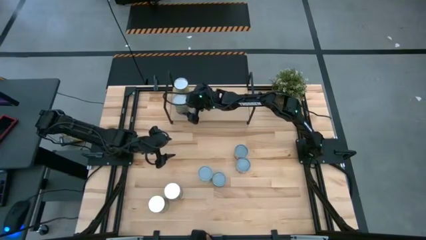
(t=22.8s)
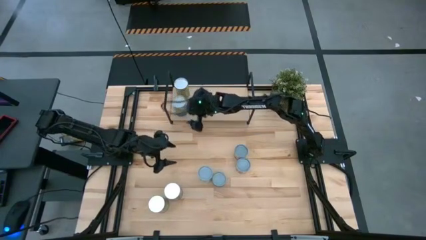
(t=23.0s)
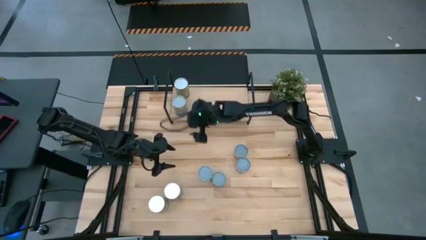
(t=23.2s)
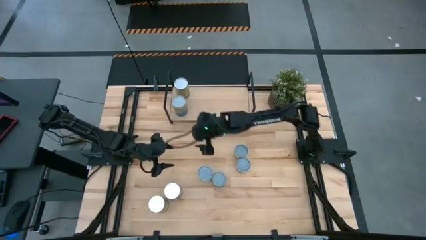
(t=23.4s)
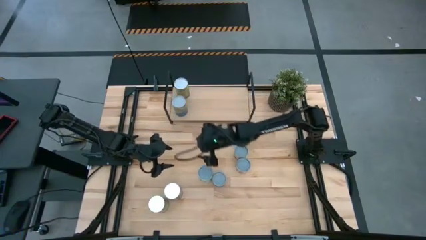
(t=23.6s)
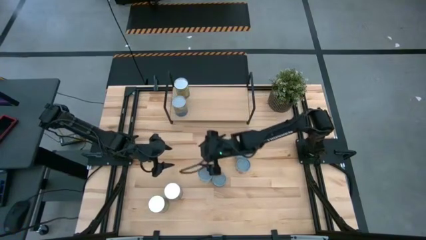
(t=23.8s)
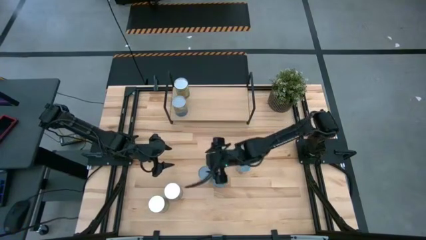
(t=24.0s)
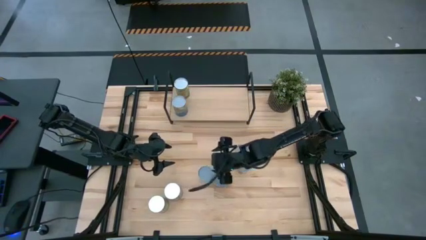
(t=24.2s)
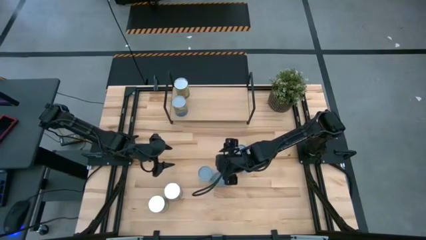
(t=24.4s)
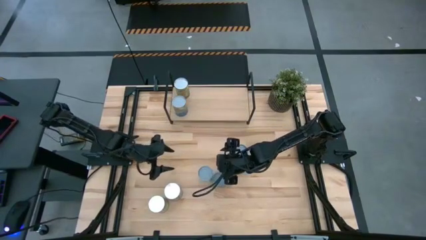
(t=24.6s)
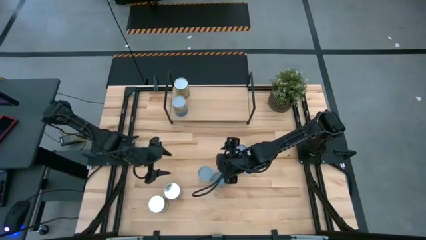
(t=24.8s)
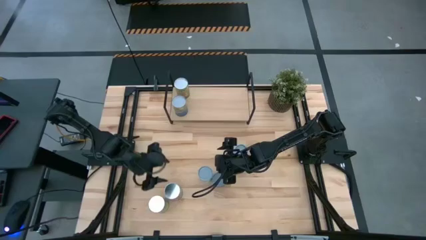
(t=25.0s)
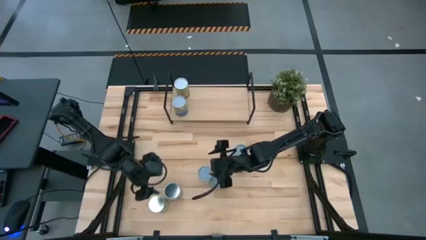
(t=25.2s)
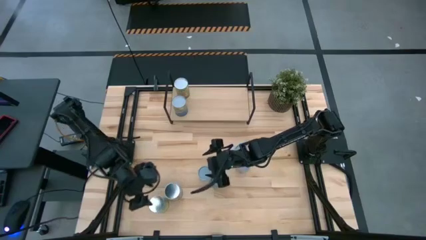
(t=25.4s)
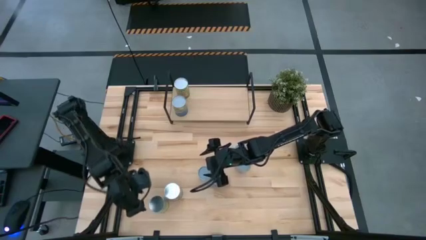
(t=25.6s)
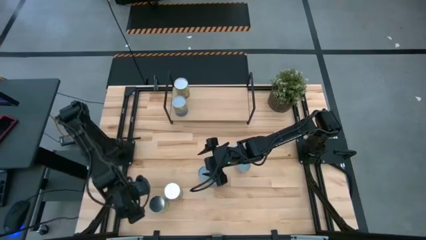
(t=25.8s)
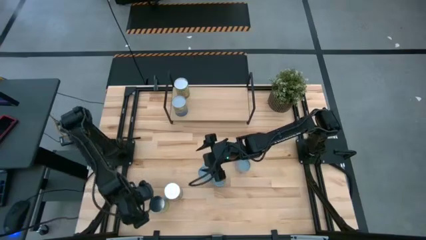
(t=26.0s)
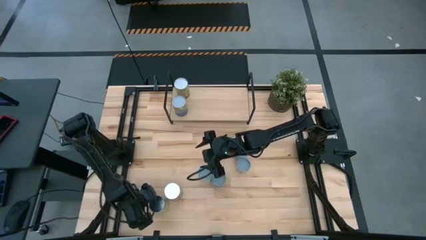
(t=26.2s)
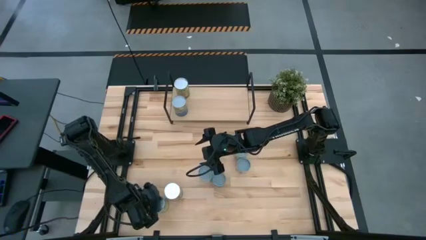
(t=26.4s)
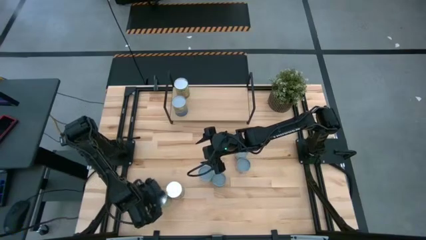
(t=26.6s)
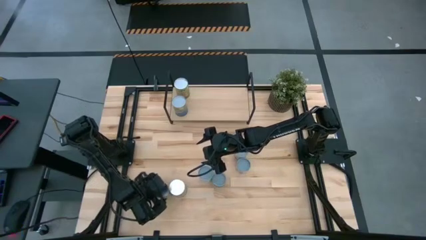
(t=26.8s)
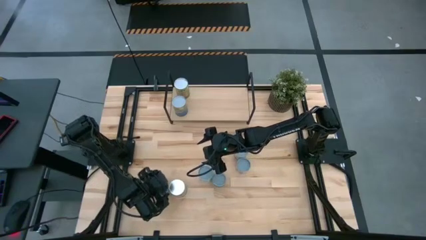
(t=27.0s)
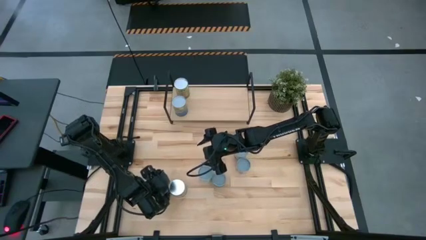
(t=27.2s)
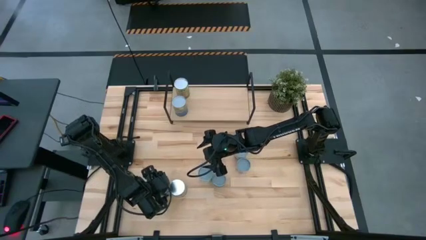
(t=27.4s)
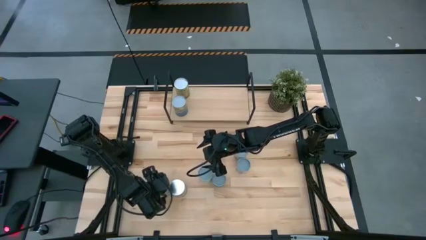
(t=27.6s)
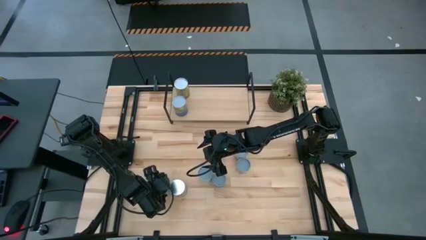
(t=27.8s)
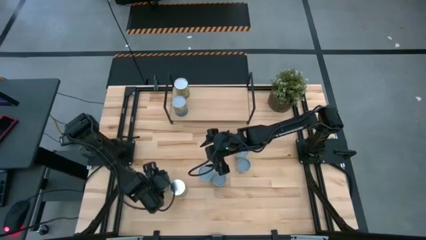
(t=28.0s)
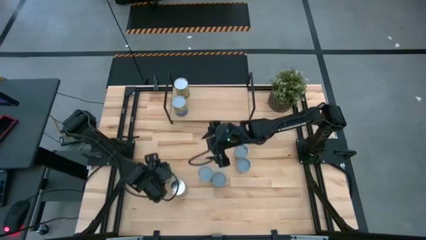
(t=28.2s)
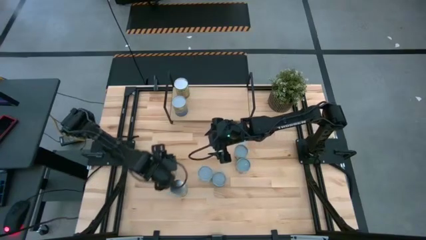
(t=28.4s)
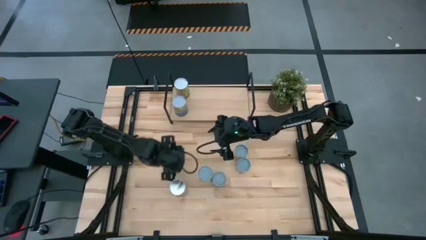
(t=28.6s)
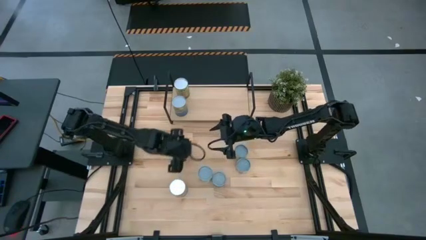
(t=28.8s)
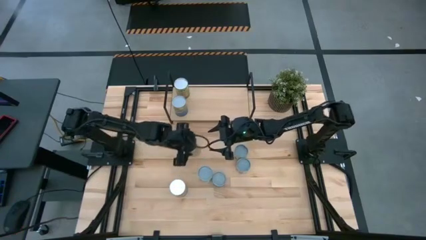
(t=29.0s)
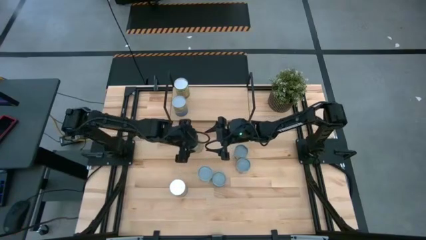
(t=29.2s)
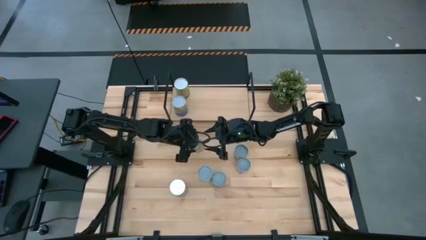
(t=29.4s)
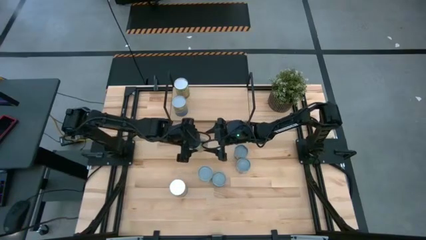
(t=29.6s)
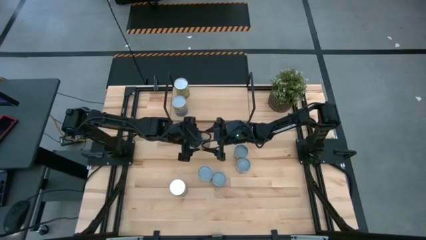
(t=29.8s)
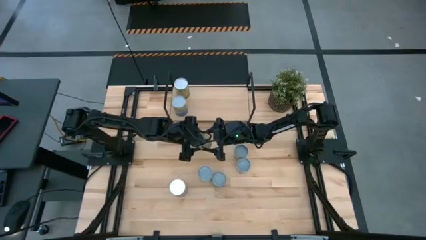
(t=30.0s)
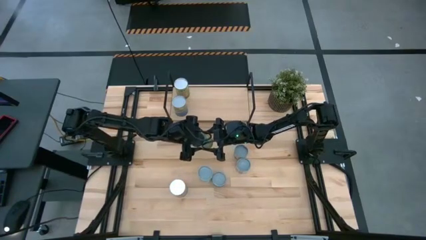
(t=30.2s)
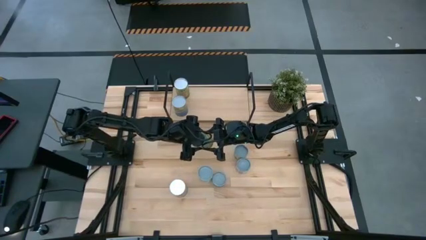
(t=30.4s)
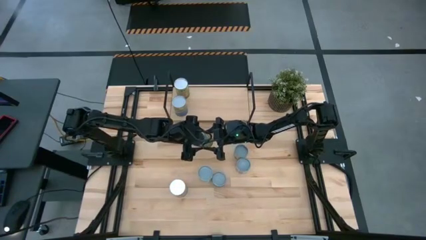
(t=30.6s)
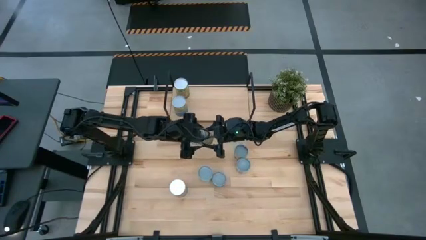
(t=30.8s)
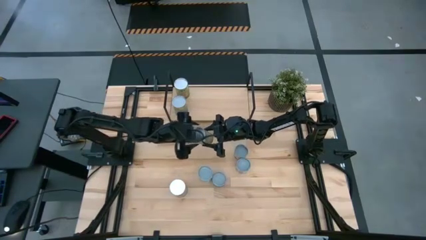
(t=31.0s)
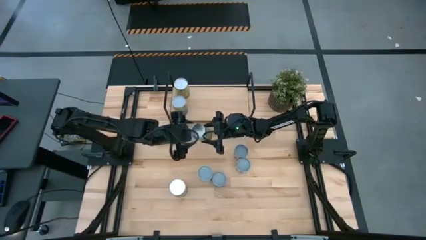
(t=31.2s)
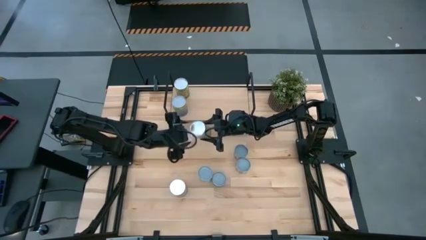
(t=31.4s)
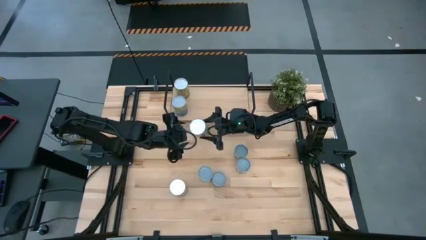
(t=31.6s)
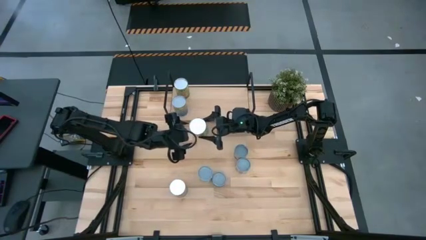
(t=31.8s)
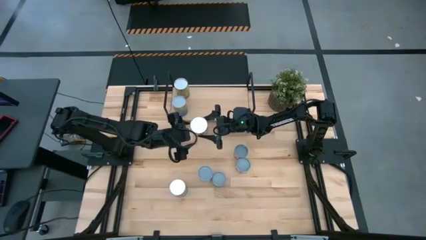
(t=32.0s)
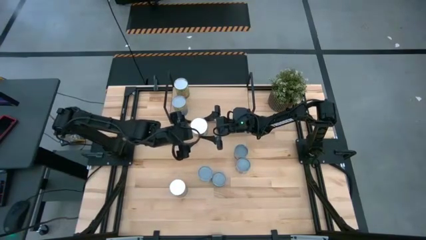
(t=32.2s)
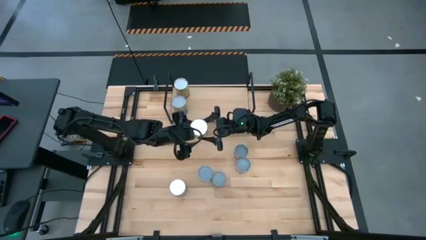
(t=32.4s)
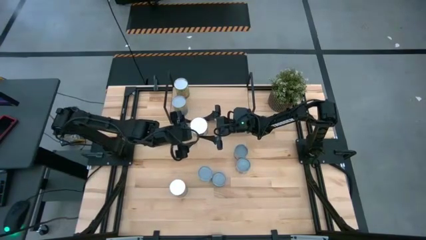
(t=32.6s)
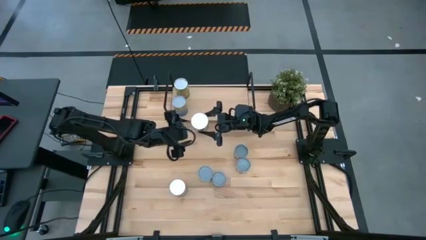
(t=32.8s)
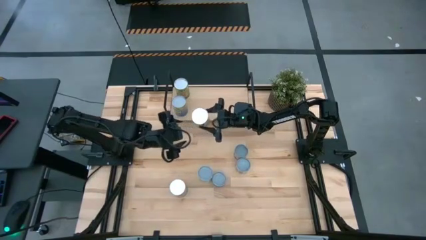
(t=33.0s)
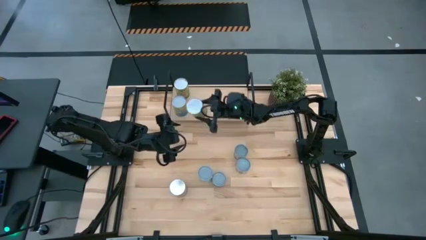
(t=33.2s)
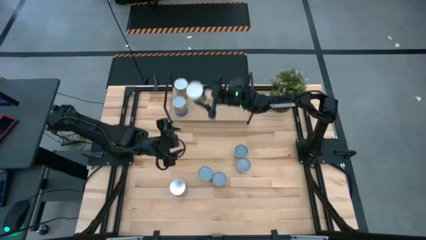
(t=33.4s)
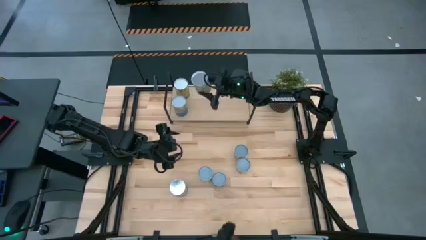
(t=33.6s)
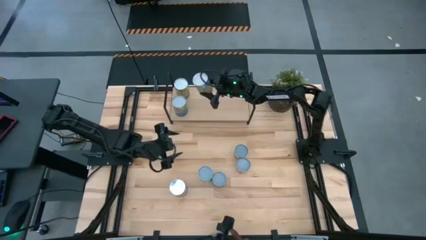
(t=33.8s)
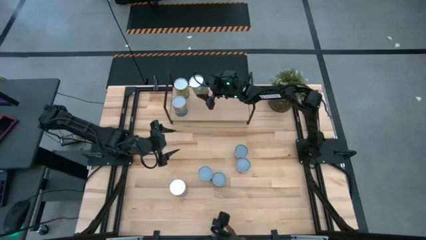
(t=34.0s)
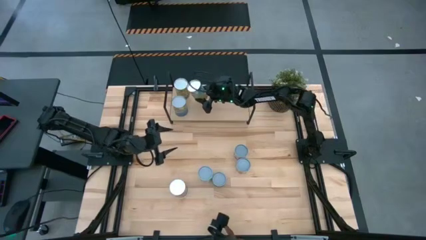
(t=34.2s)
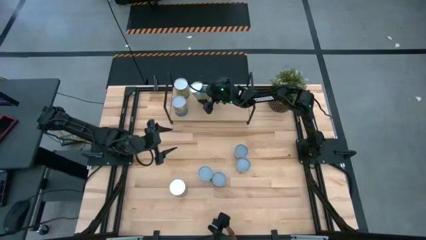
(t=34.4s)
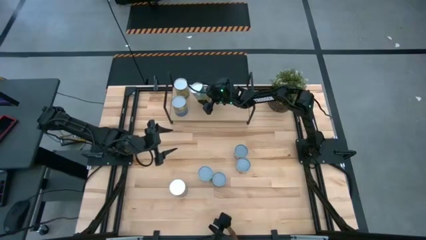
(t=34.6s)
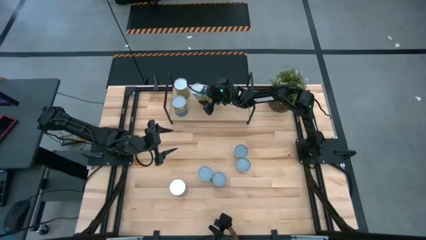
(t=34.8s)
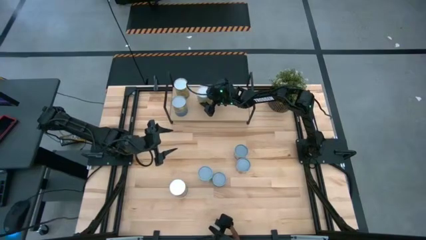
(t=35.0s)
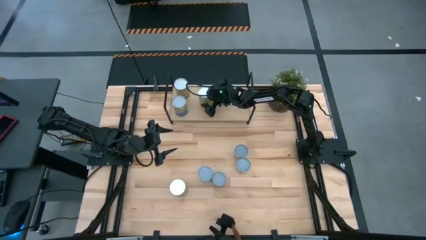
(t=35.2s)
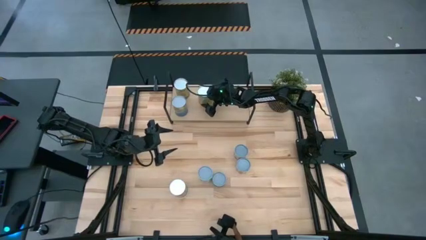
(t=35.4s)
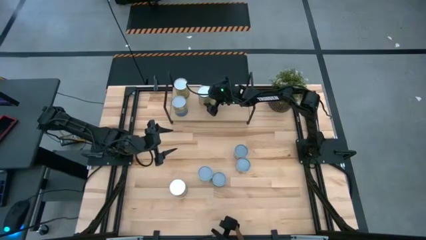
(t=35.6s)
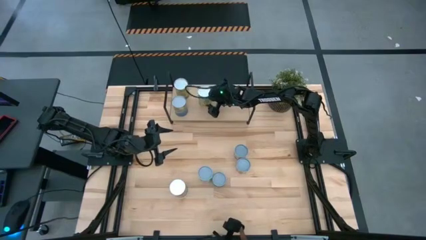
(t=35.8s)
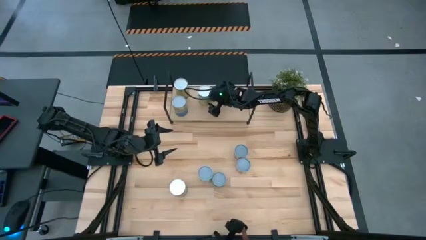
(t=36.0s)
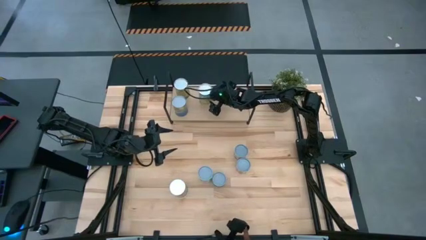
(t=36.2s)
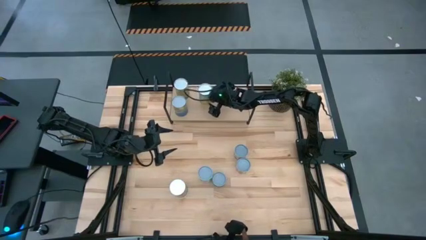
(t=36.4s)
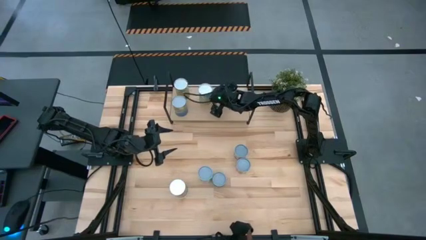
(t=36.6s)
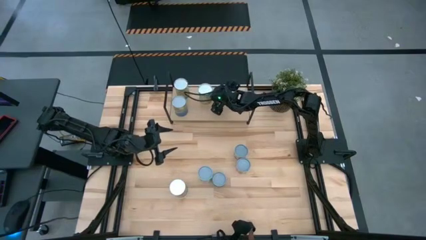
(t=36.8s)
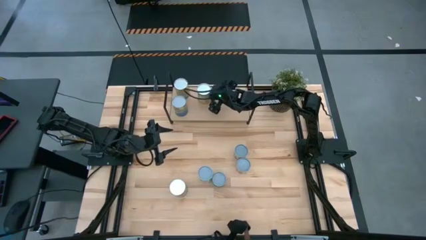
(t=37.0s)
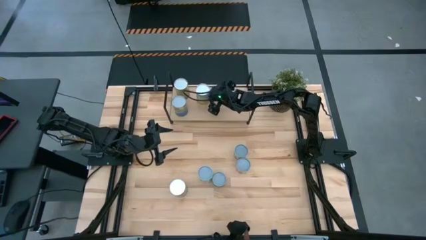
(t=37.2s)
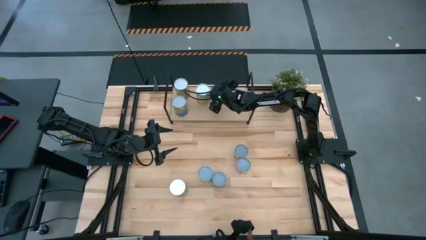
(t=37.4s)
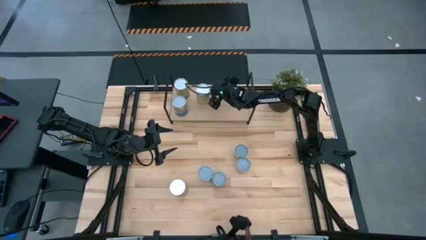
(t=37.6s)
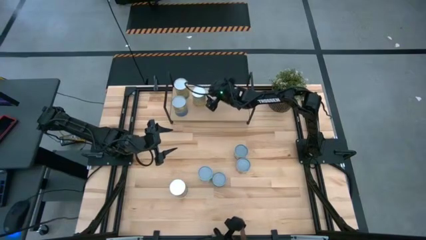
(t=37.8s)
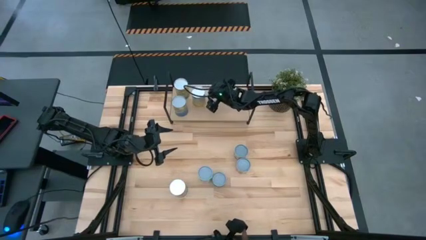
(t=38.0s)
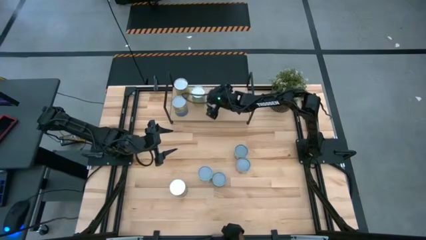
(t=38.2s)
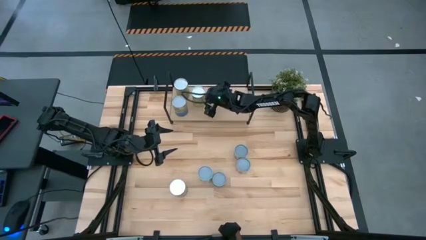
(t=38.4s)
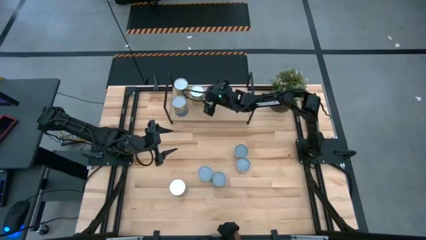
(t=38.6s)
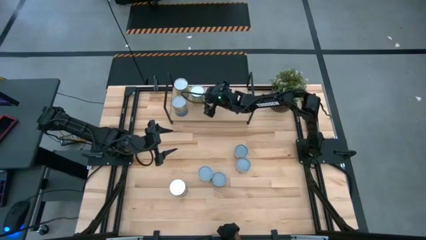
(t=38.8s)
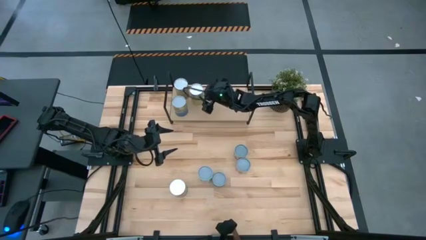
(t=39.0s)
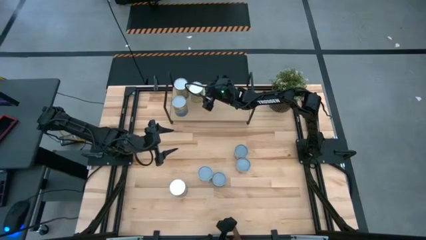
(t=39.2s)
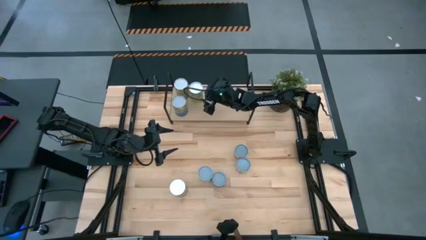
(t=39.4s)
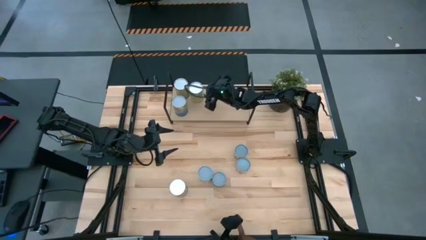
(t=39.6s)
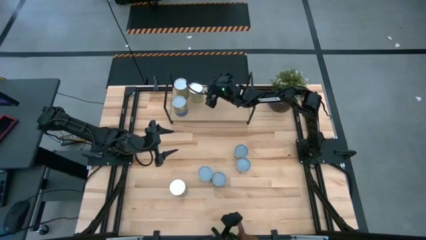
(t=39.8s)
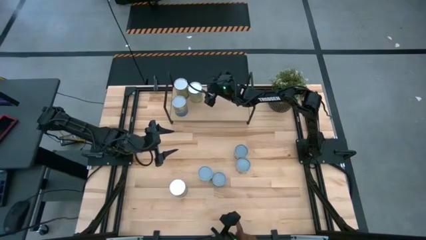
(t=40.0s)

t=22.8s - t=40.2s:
Task: Pick and place cans onto a shelf
Put the canned carrots on the shelf
